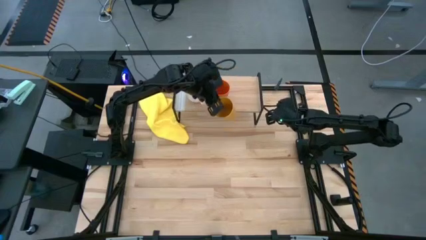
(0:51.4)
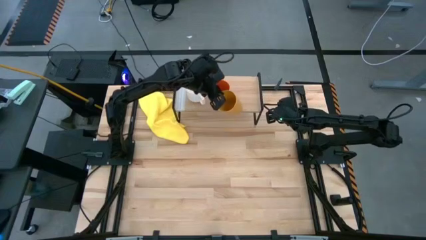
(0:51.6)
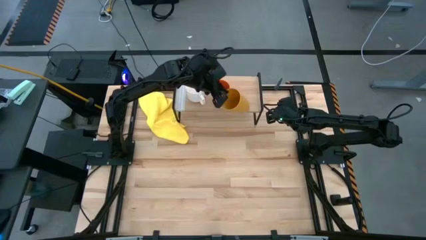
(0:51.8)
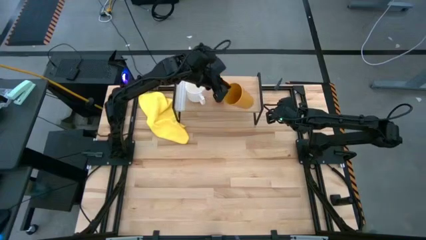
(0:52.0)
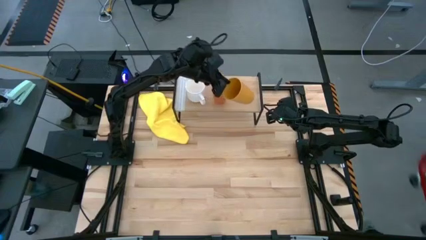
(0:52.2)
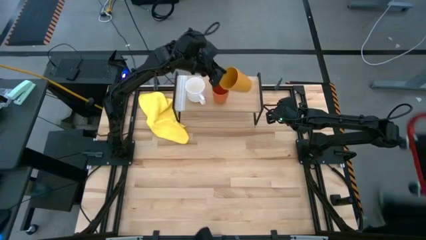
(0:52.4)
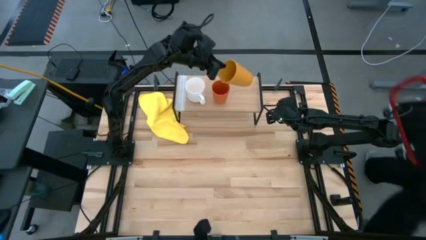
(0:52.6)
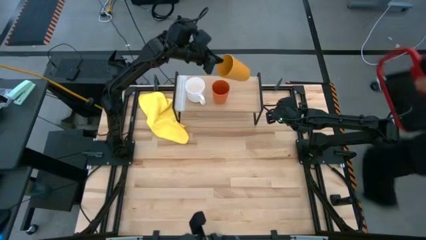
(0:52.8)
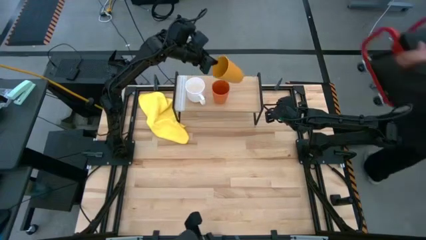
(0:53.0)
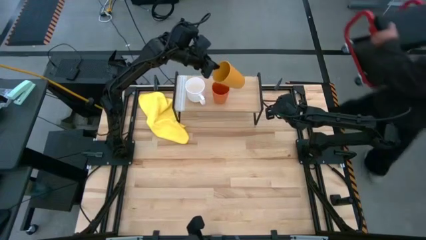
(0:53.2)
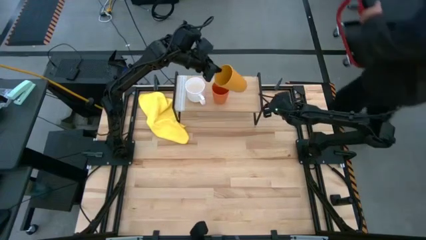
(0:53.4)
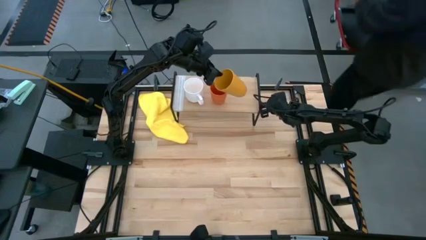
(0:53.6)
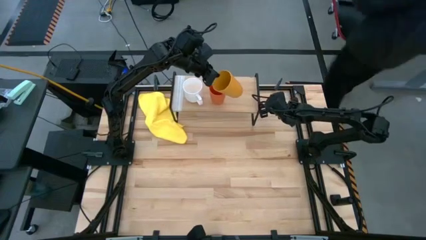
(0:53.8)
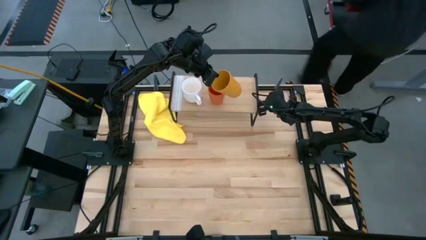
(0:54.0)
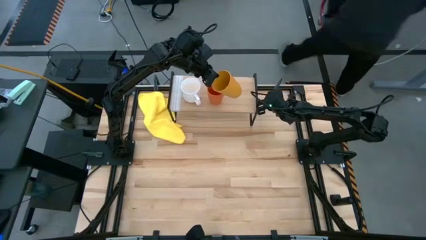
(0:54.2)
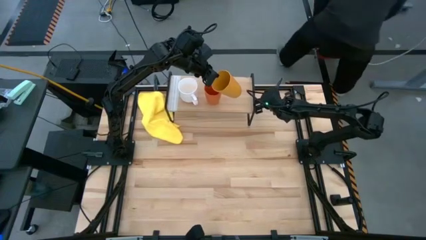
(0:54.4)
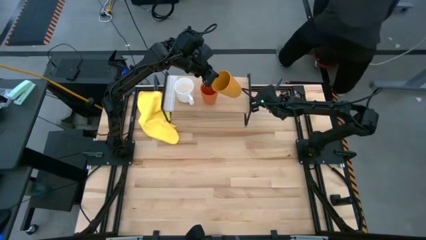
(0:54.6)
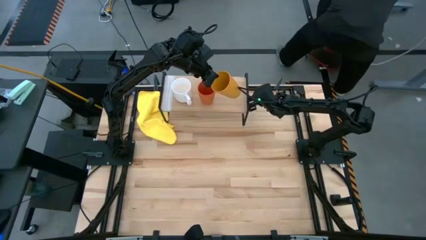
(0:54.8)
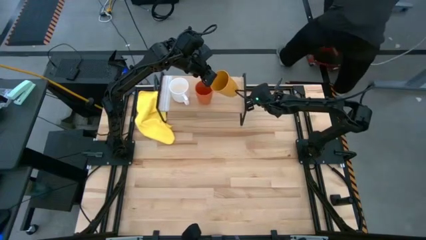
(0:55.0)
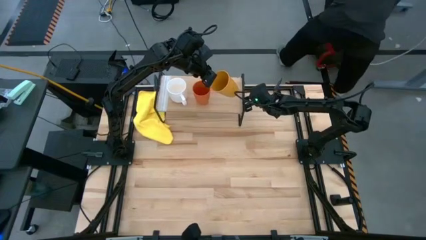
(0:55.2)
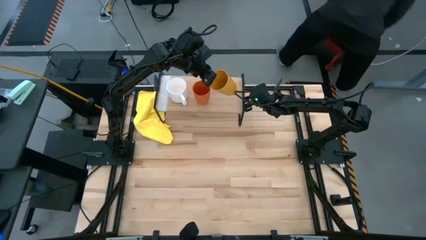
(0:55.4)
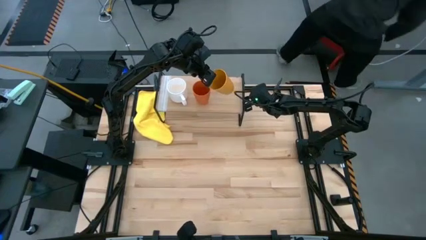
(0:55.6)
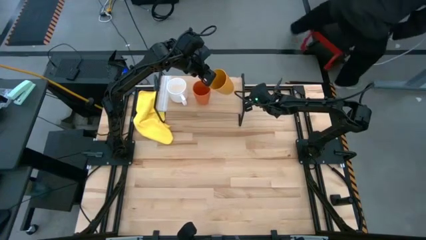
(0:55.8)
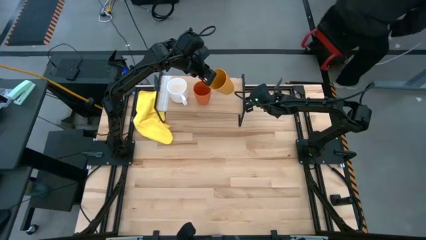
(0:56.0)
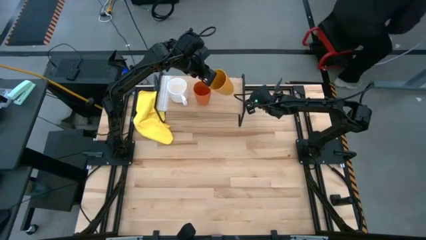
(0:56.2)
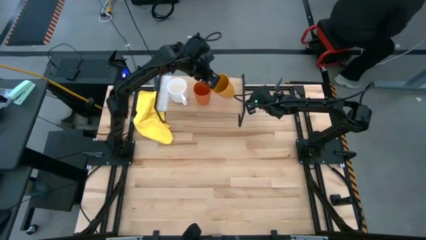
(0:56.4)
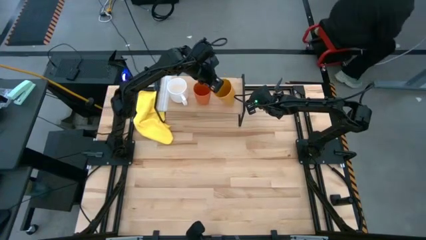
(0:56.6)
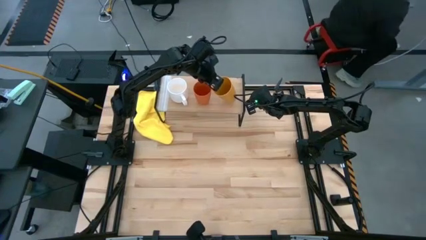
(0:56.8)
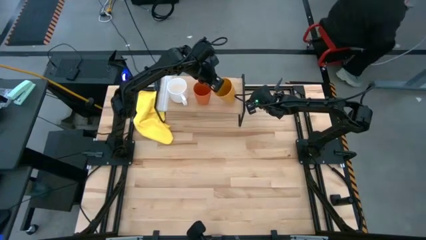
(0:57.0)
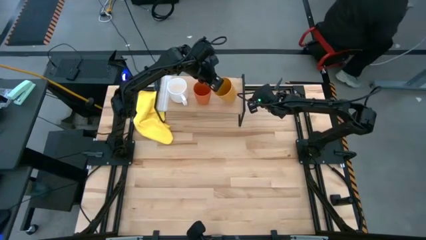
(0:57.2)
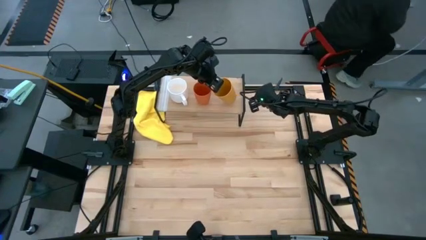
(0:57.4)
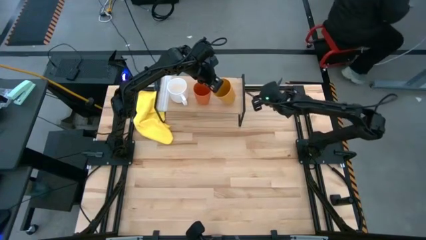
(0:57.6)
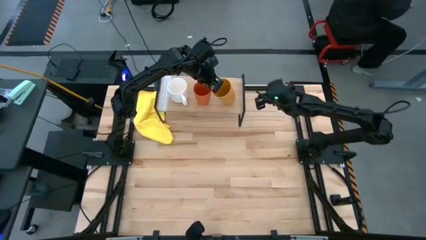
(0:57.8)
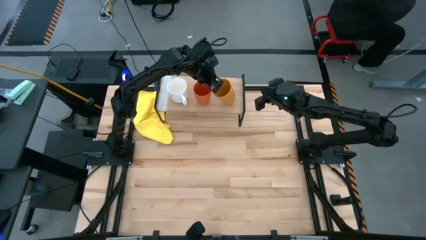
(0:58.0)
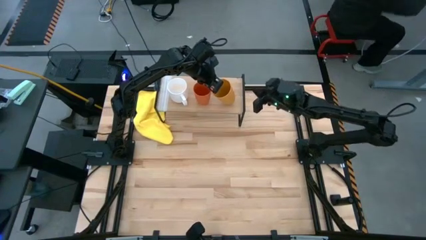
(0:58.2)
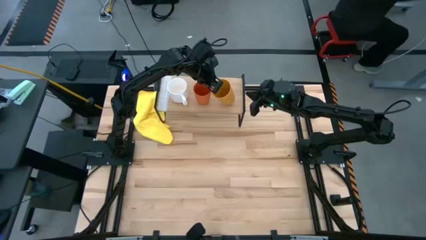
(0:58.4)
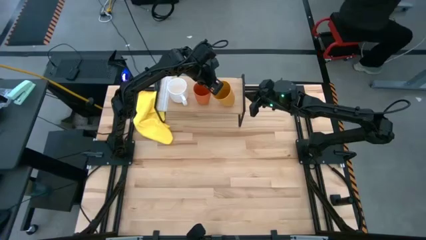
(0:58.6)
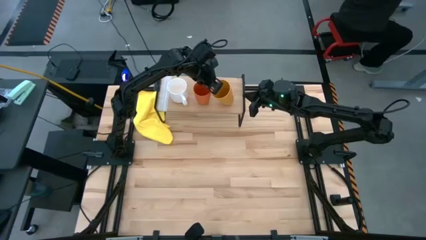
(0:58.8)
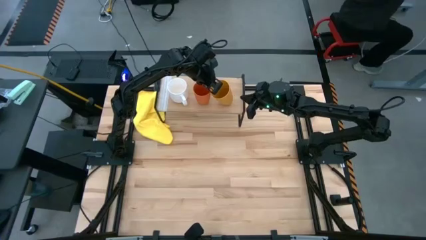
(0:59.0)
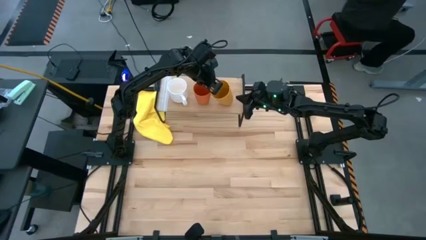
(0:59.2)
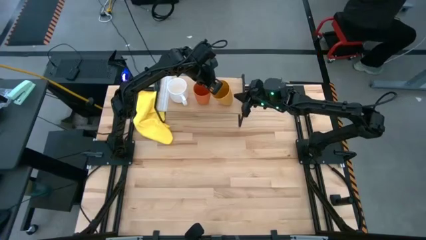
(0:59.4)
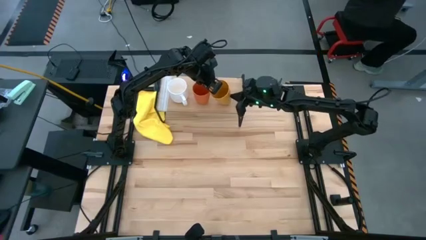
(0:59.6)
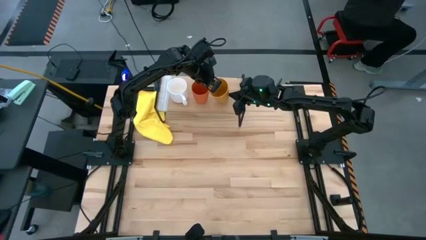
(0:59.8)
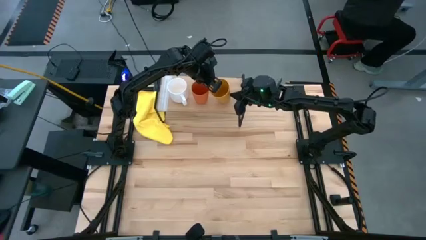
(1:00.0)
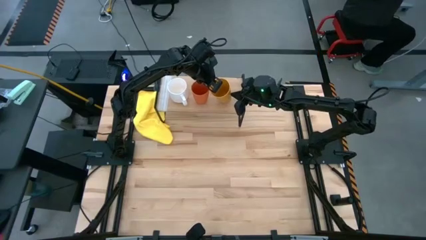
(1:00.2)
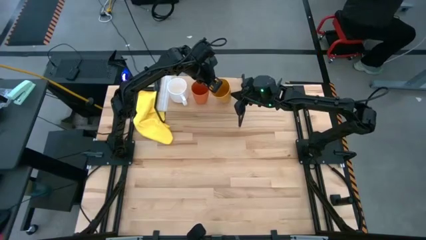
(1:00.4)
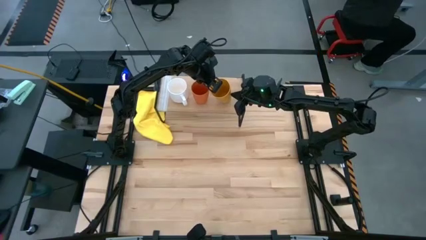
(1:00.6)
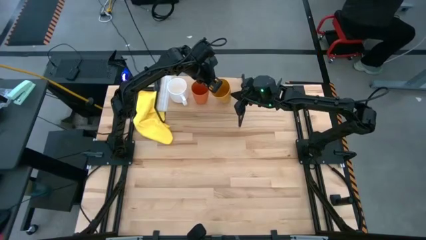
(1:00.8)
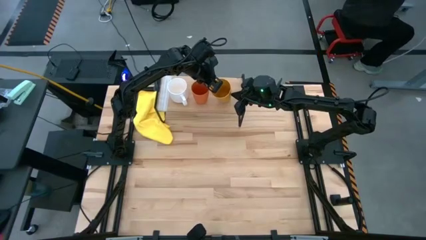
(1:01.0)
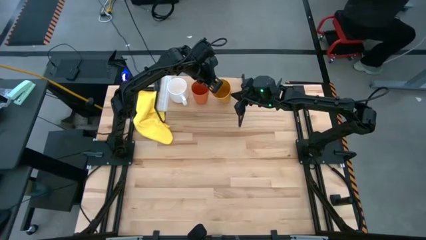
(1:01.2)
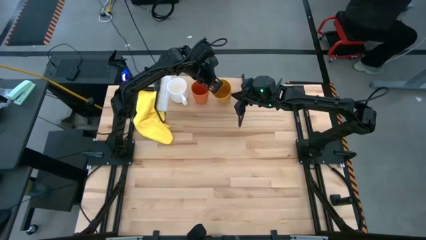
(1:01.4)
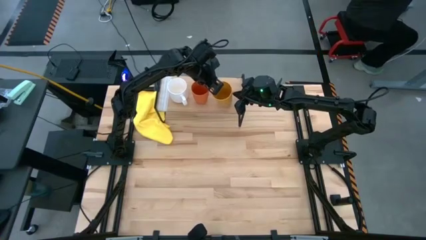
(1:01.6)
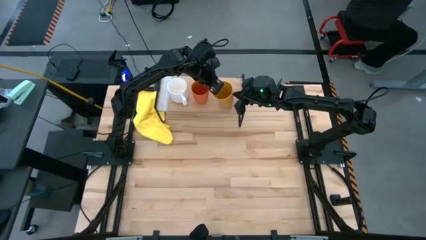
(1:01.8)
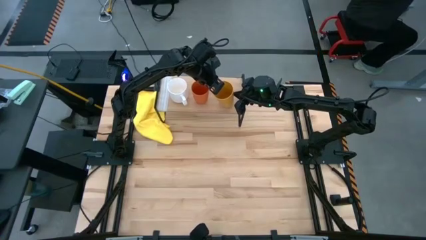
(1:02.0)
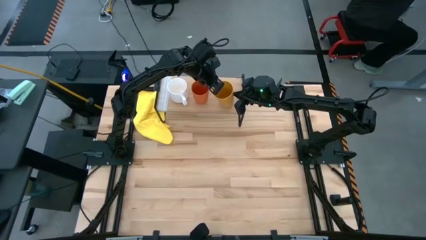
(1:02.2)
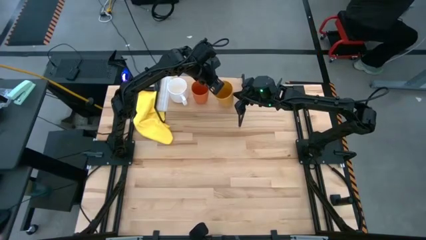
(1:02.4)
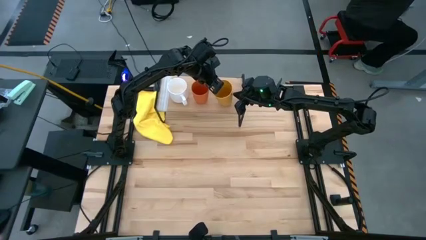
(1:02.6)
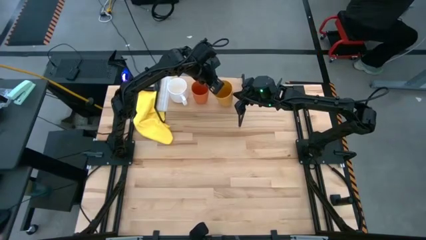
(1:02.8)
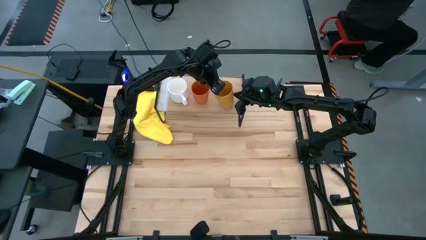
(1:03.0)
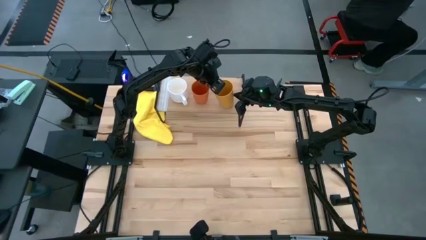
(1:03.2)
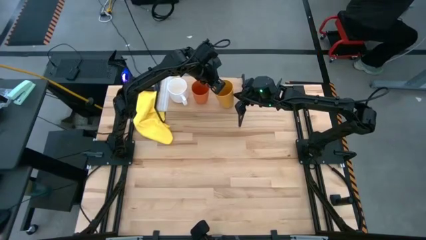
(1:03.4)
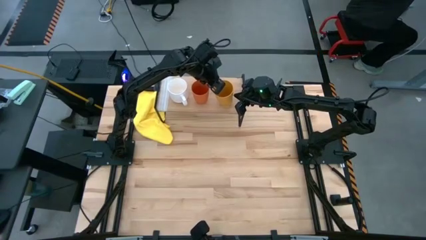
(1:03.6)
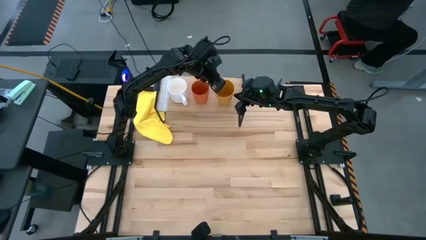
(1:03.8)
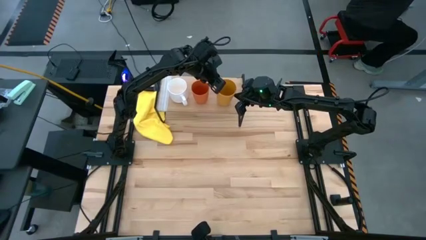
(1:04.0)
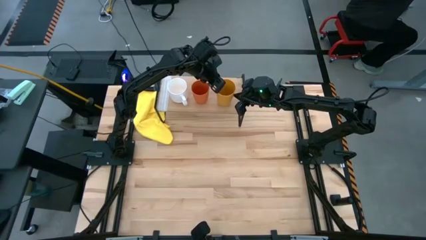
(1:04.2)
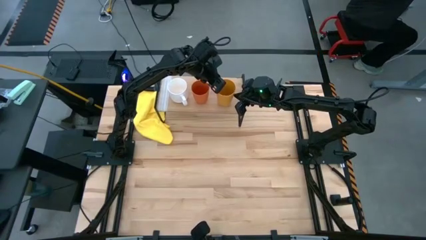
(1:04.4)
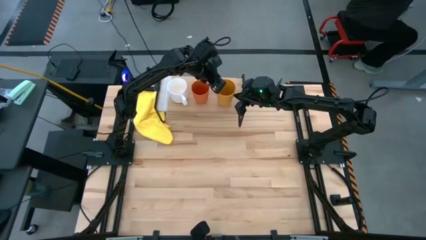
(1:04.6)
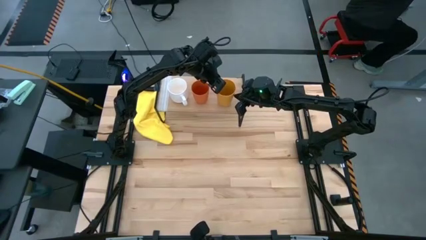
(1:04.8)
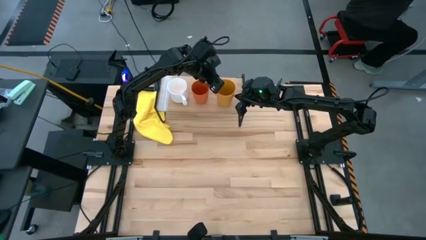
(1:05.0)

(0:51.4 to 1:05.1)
Task: Stack small to large cups/mugs on shelf
Put the yellow cup on the shelf

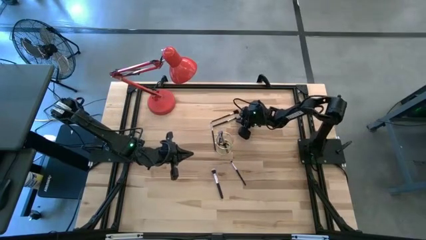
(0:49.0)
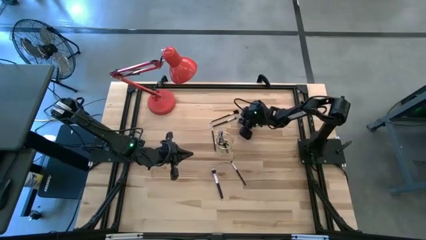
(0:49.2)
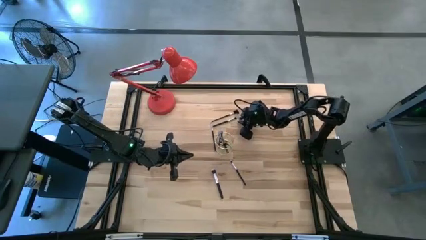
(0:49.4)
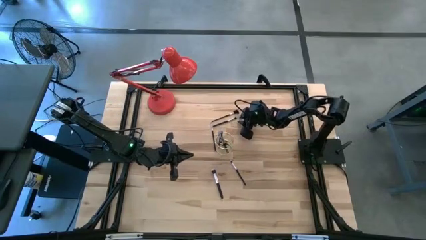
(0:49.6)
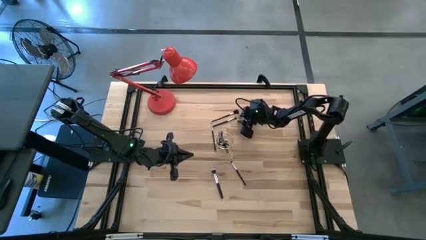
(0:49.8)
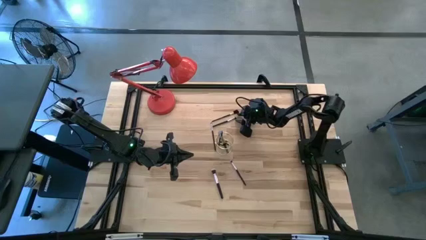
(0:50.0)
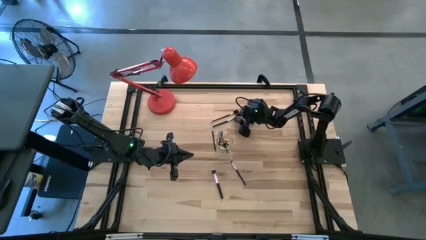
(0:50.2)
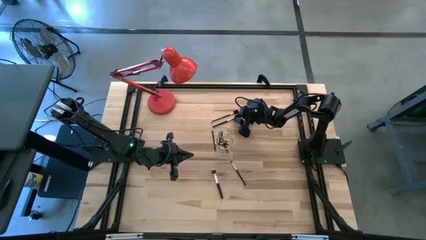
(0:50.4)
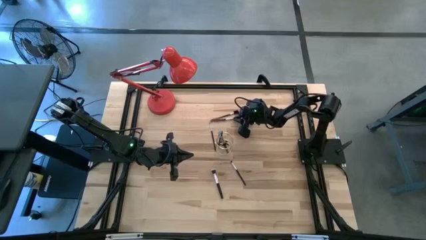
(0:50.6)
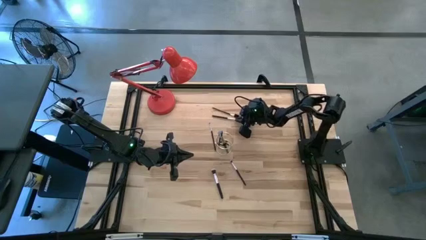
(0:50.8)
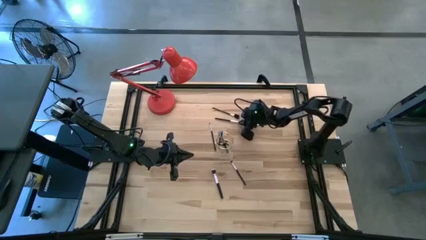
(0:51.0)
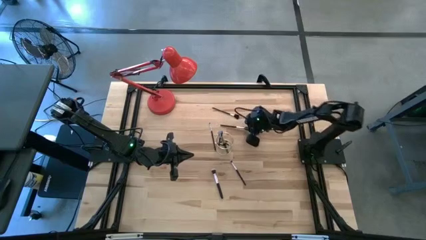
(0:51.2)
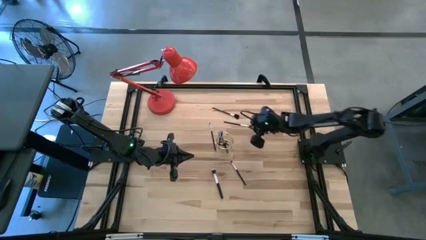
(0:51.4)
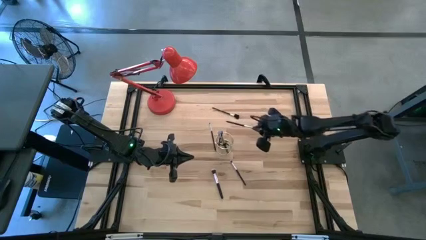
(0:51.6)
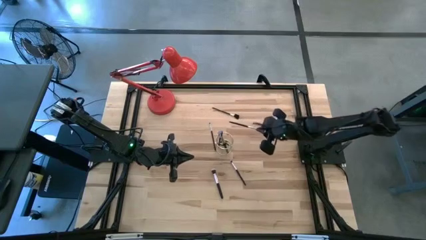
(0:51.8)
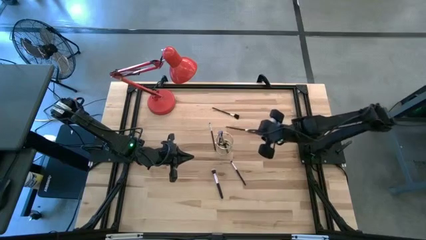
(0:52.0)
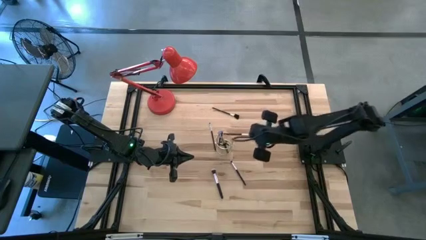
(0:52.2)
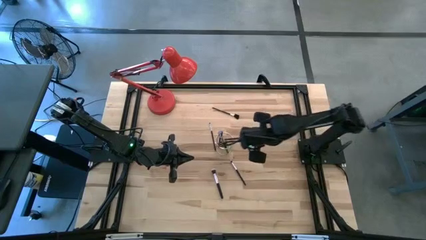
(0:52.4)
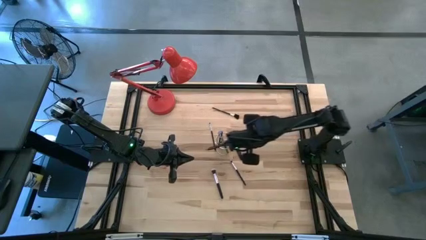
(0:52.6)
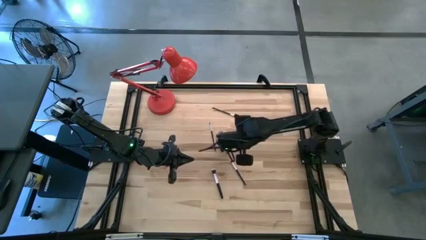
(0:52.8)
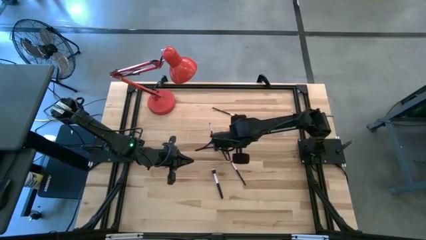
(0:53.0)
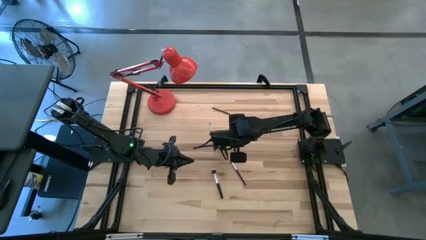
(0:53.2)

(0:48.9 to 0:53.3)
Task: Put items in baskets/containers
Put the eyeshadow brush into the wire organizer
